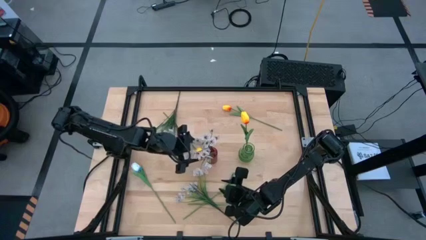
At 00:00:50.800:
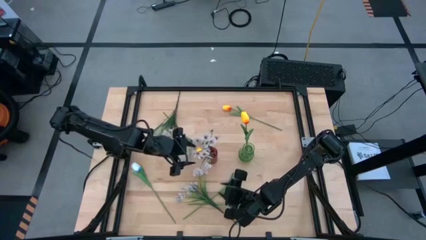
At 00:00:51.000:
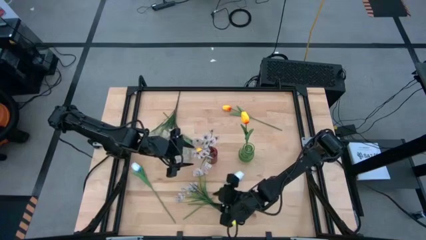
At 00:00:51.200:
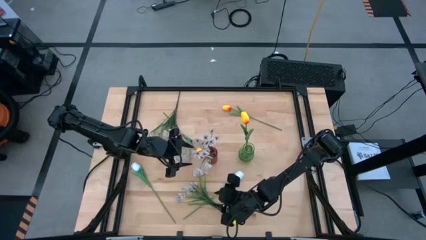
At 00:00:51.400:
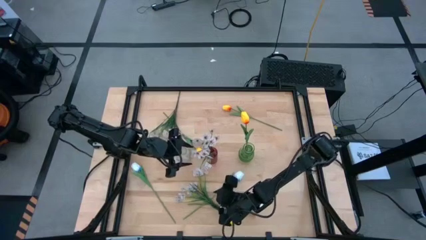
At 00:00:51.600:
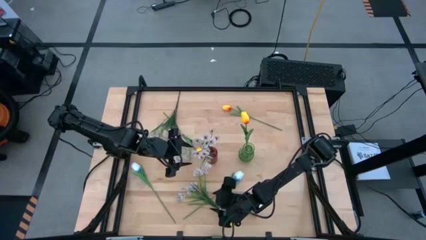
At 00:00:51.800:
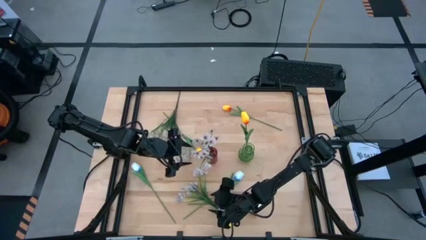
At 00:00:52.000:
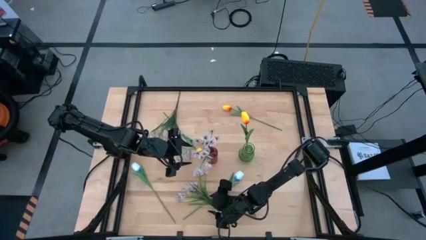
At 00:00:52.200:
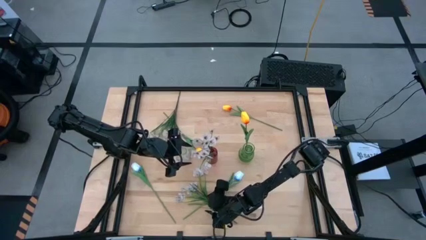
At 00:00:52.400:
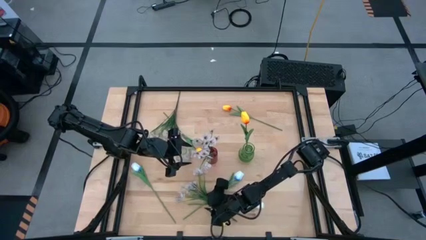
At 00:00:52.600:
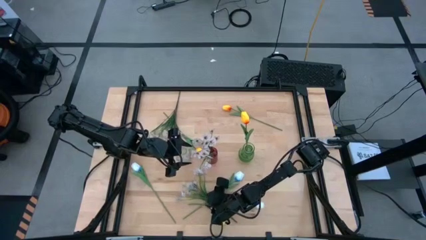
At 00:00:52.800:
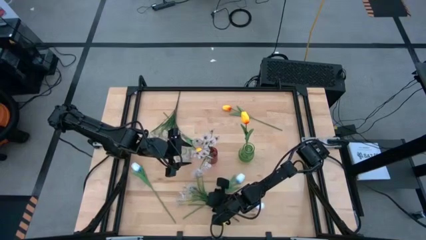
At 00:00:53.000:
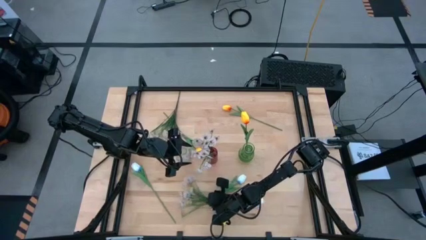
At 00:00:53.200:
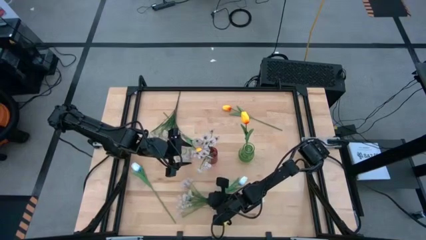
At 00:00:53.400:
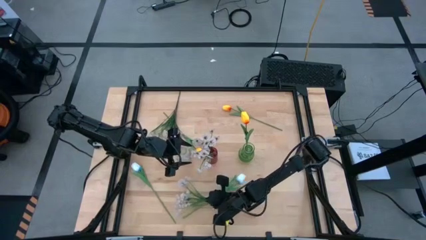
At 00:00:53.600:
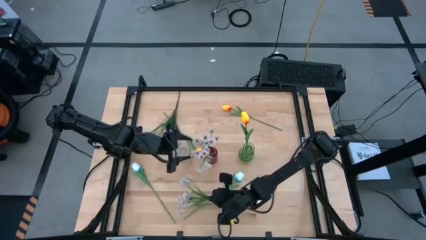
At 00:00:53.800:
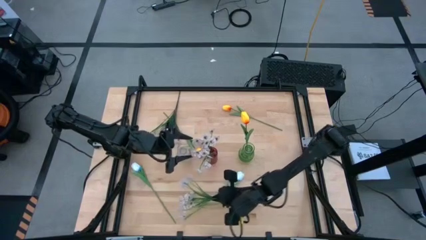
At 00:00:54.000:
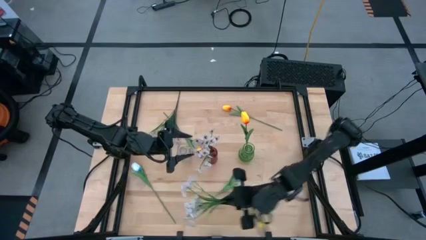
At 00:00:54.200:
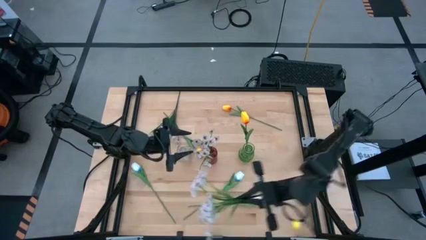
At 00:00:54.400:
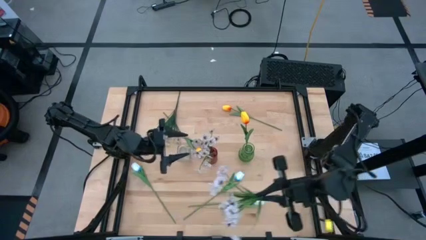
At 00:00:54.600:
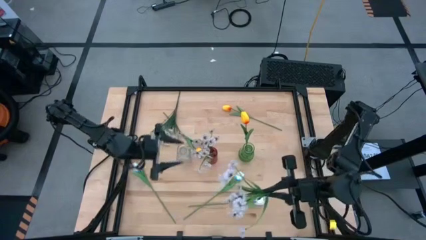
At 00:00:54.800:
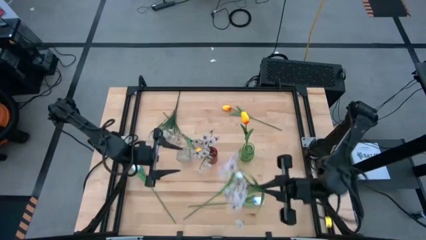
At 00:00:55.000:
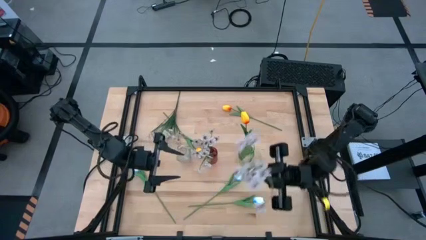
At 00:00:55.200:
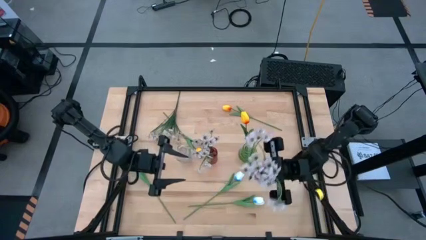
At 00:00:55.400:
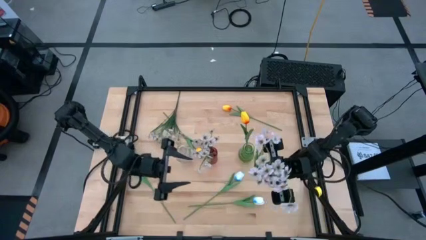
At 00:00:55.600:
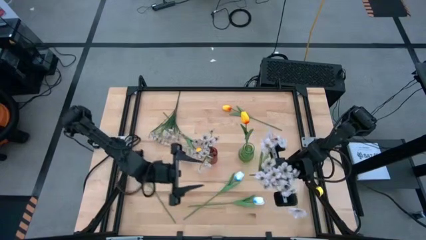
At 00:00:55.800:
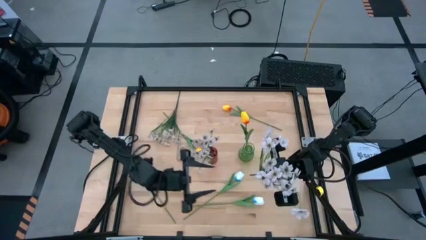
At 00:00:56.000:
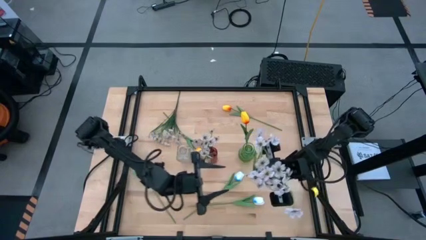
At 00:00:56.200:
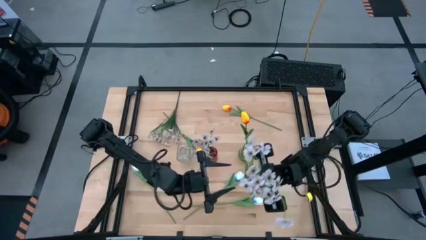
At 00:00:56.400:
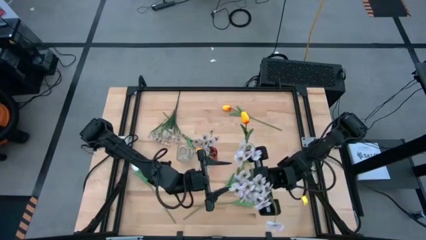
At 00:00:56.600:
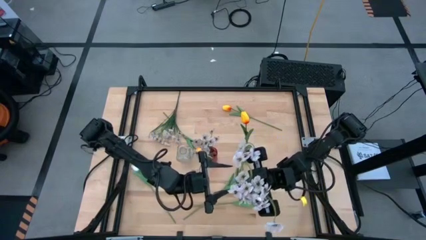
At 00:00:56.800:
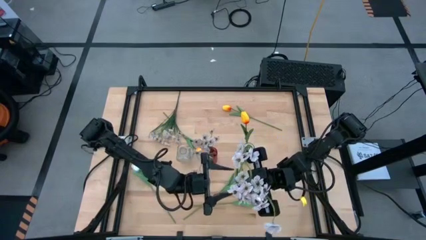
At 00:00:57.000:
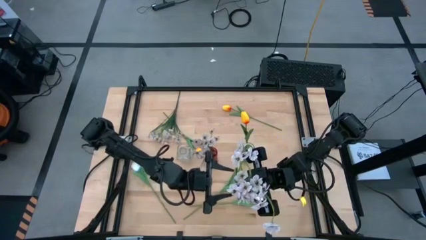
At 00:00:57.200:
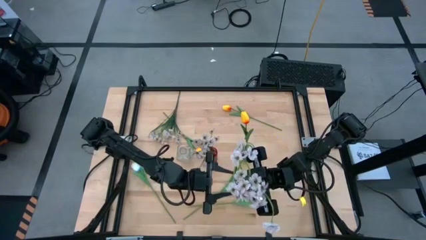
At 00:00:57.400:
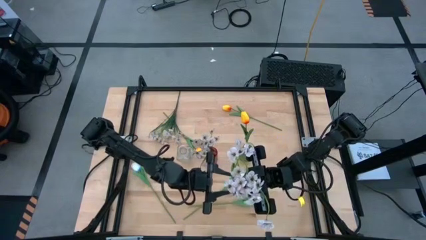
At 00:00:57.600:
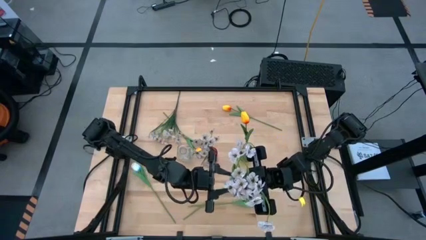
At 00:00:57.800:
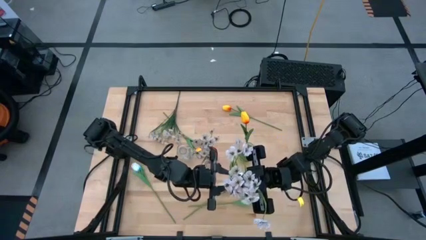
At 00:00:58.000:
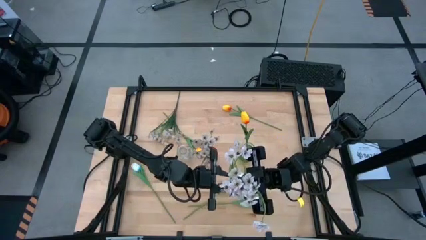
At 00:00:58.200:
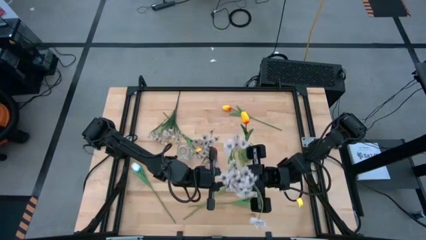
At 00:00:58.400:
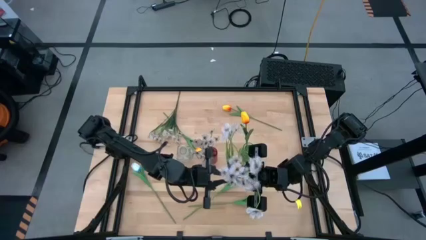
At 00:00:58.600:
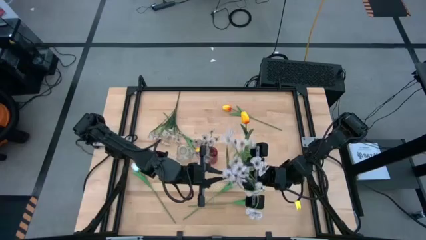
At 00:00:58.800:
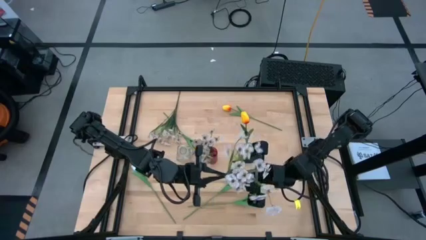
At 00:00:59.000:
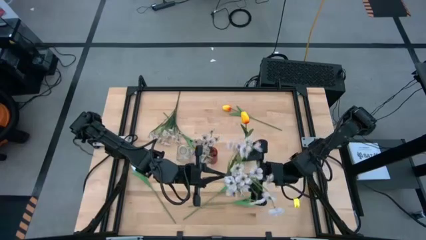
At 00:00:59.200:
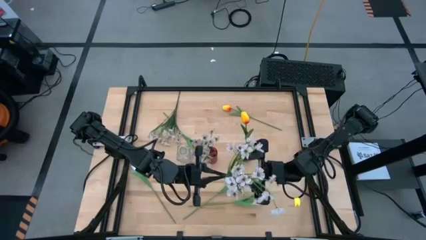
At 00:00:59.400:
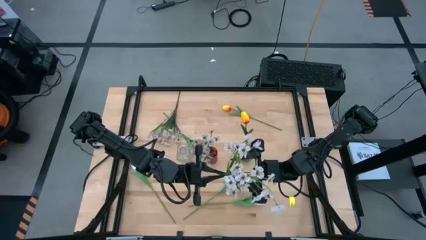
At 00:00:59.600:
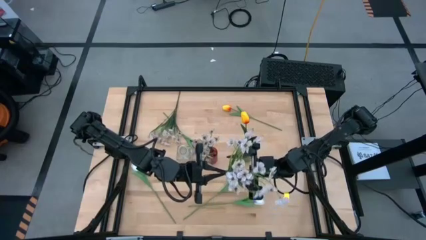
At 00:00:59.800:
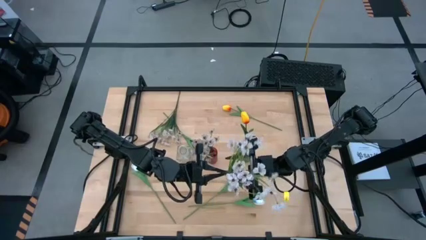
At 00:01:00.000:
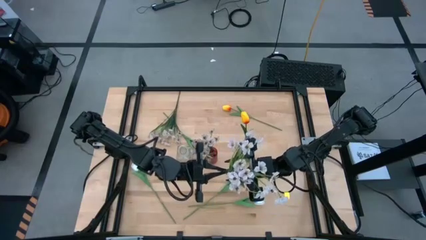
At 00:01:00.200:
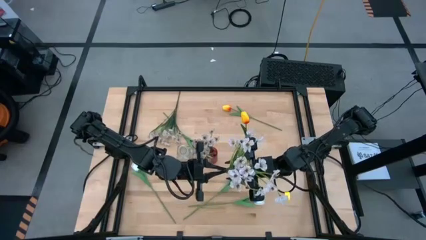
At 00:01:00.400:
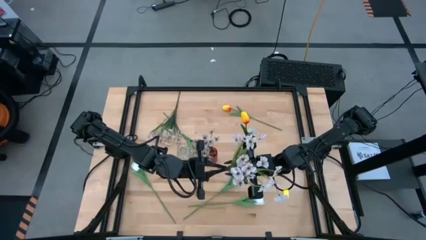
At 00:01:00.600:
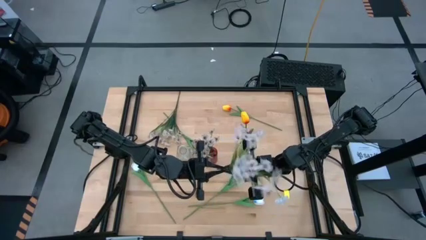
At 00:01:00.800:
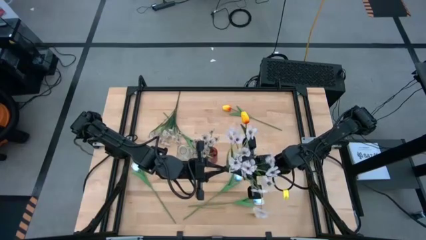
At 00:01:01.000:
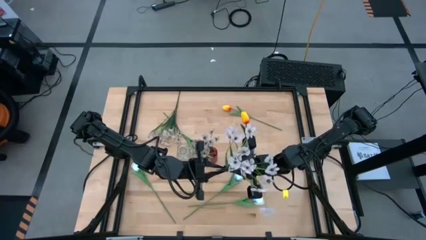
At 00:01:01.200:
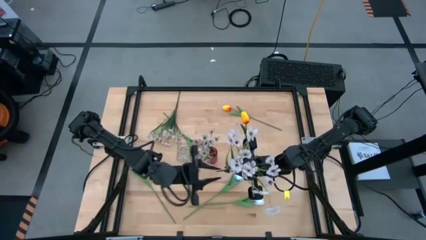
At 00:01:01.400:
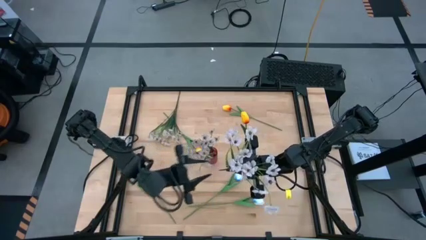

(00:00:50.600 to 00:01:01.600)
Task: Sort flowers into vase by color
Put the bottom white flowers into the red vase

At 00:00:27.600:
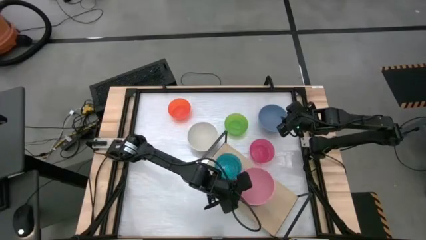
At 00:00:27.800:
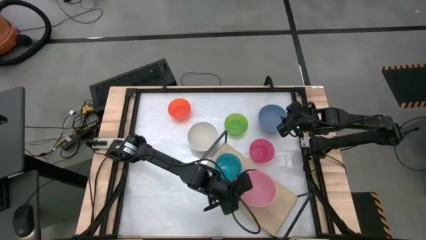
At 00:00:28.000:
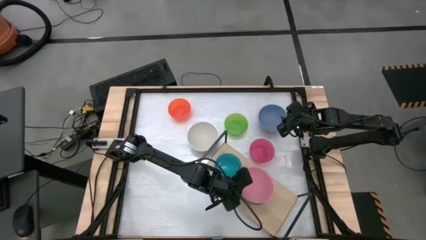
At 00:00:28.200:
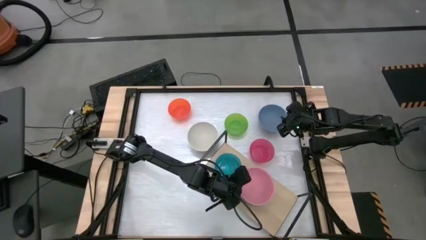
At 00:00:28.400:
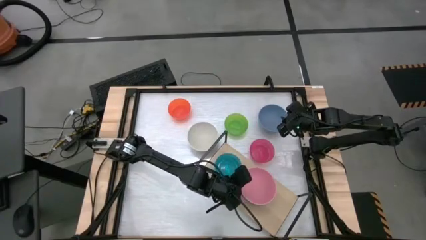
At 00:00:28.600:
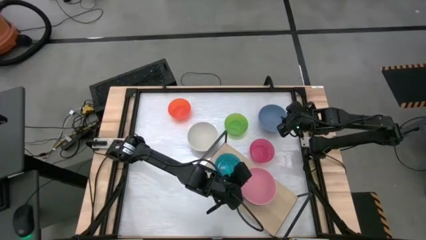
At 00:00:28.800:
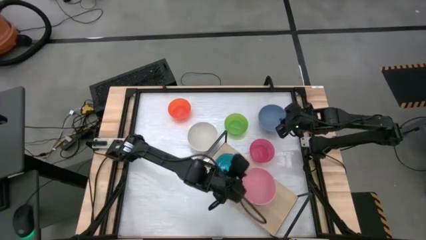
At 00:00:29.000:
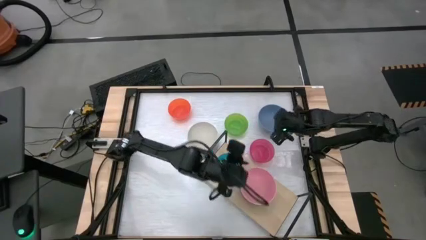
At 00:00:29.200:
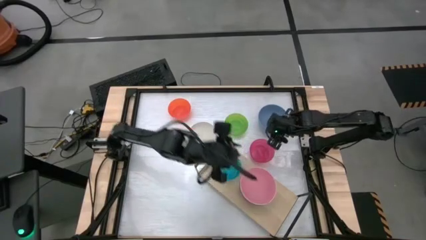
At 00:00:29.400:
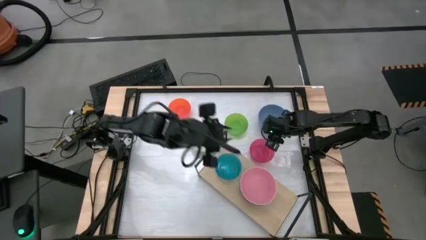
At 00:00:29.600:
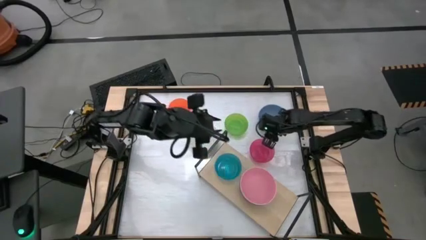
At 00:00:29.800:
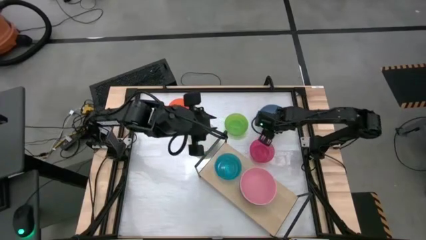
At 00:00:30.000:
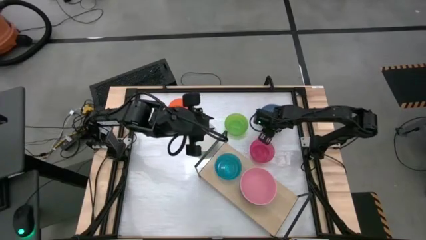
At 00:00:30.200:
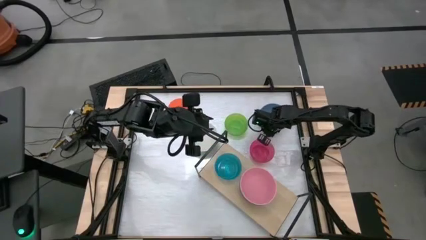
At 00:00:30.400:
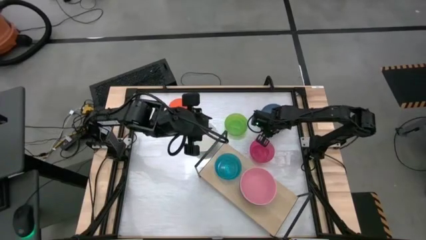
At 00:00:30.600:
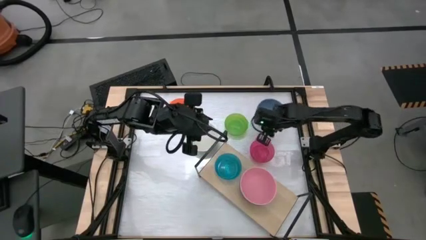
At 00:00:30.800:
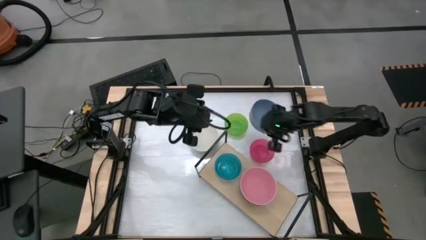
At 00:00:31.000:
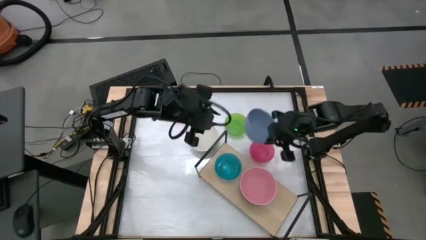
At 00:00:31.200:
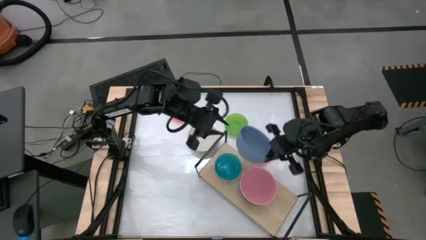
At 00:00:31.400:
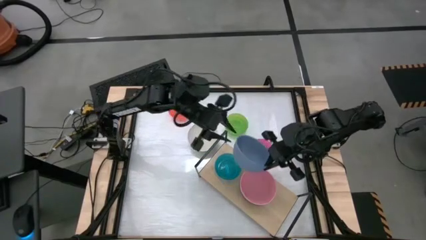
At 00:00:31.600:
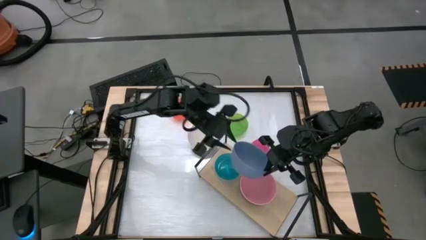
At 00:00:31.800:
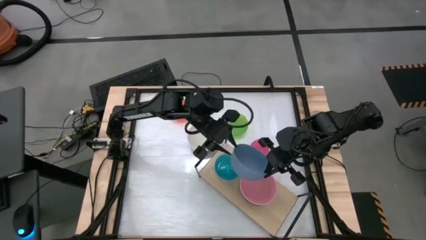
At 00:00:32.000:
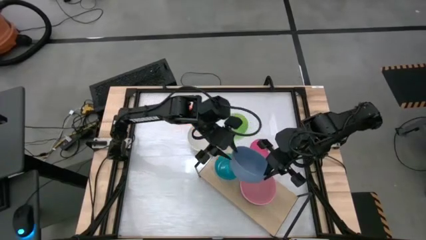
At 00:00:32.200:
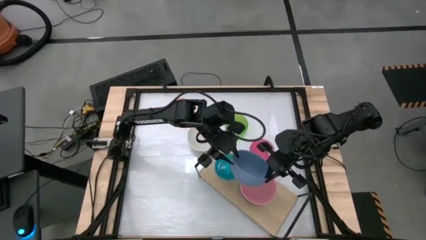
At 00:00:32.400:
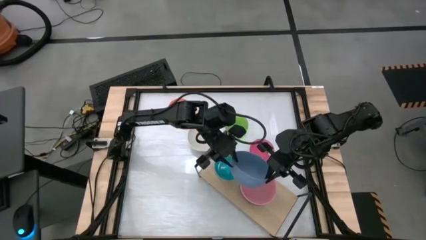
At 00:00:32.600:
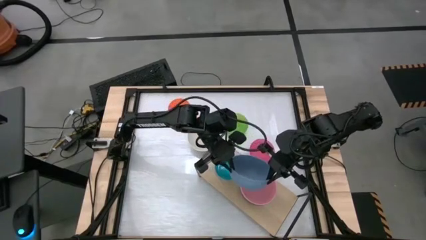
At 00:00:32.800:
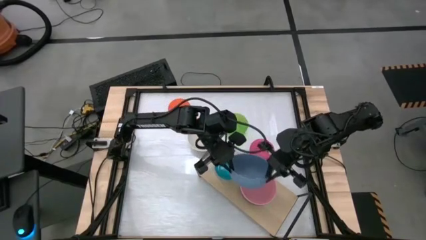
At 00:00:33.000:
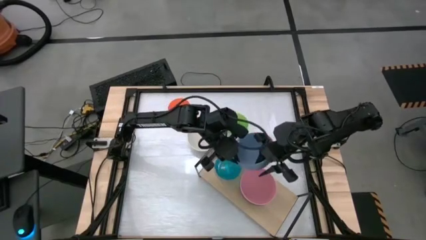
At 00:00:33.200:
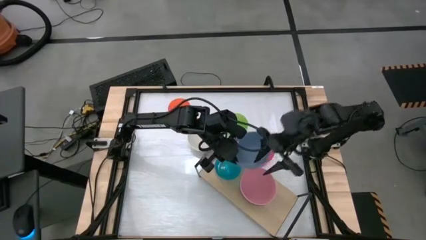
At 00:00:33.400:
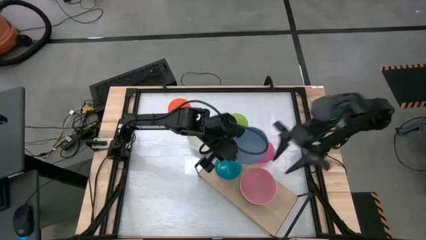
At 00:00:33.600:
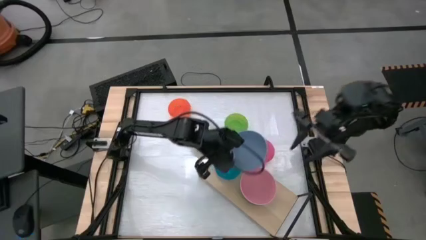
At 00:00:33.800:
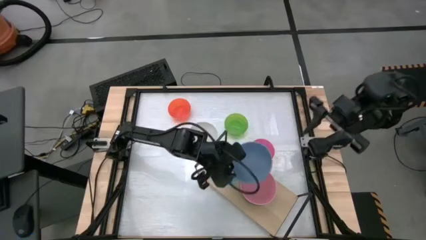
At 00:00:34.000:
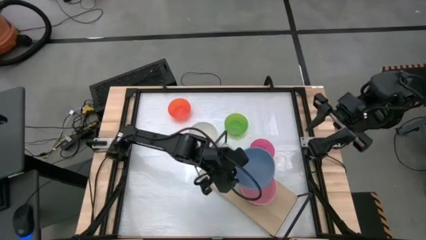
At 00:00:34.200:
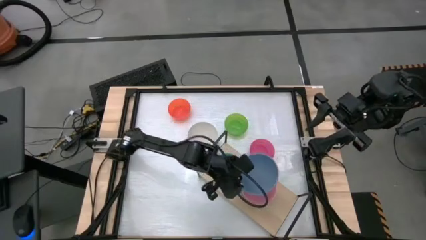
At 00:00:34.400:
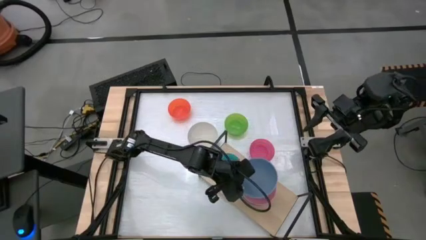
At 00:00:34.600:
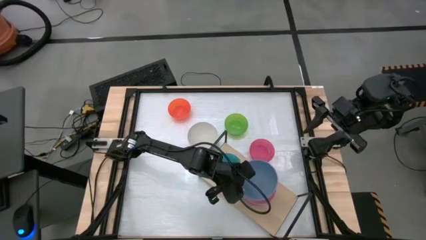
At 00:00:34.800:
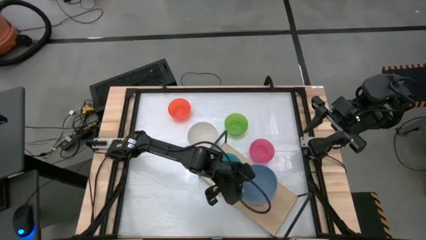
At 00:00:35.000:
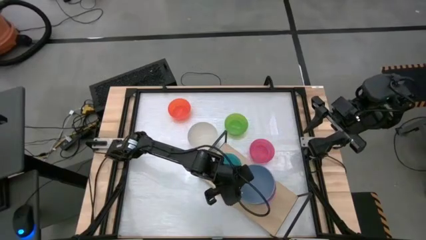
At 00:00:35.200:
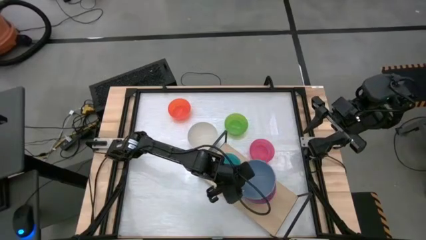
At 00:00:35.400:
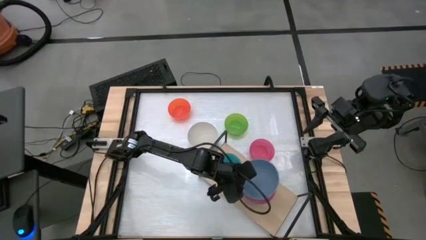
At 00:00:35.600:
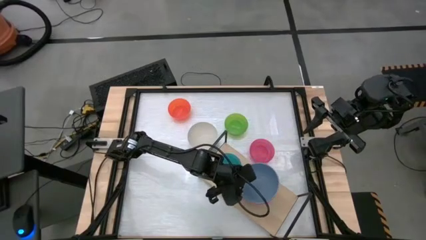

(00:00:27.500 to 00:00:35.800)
Task: Place and stack bowls onto a shelf
Stack the large light blue bowl on the large pink bowl on the shelf
